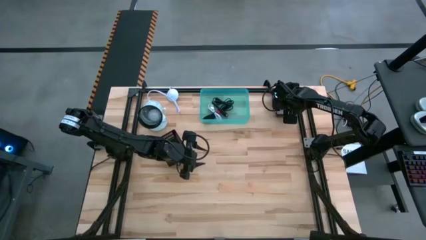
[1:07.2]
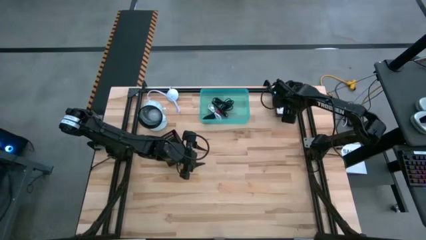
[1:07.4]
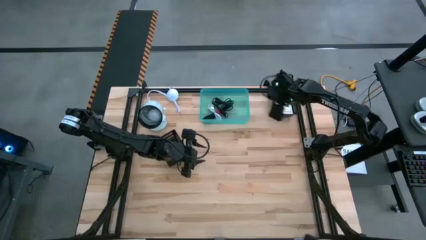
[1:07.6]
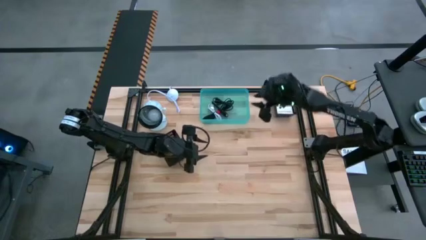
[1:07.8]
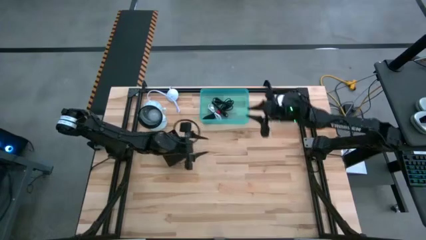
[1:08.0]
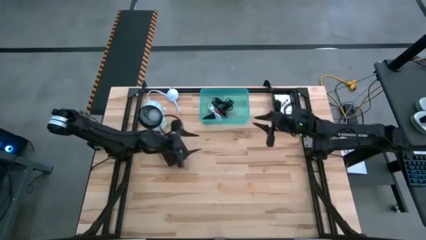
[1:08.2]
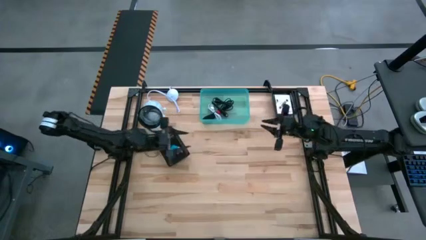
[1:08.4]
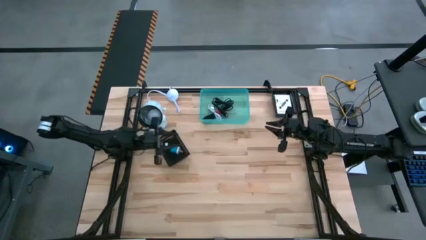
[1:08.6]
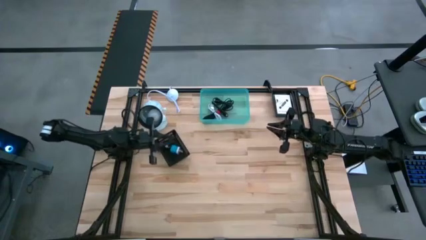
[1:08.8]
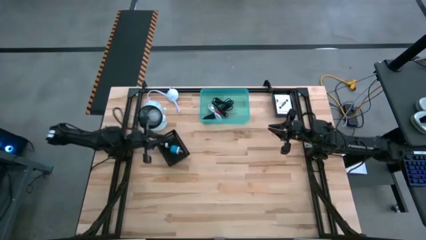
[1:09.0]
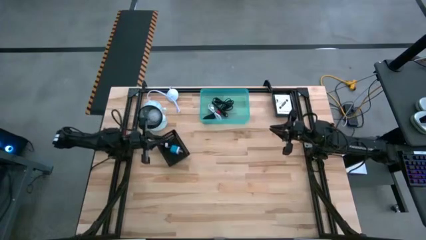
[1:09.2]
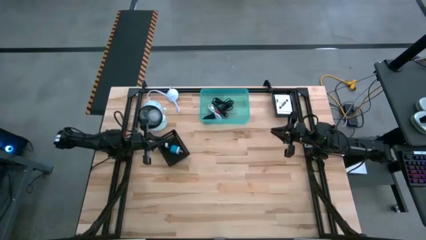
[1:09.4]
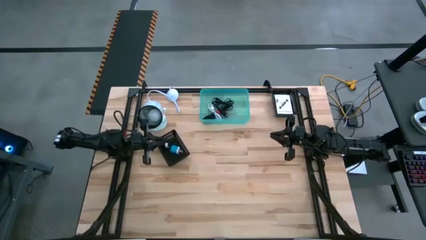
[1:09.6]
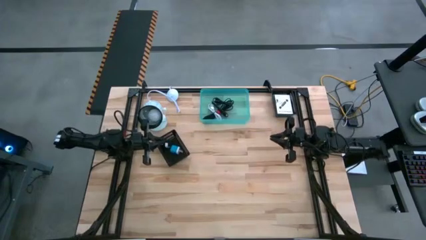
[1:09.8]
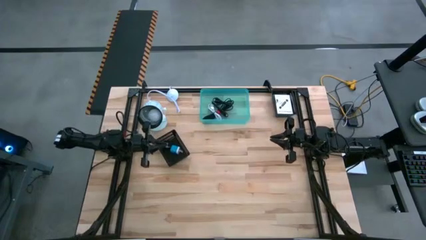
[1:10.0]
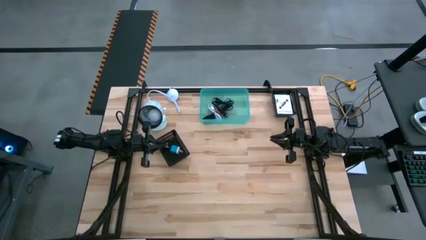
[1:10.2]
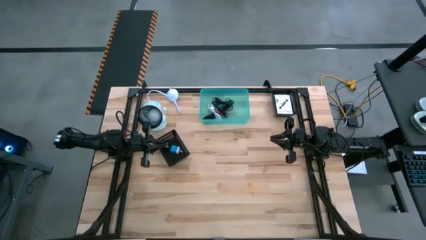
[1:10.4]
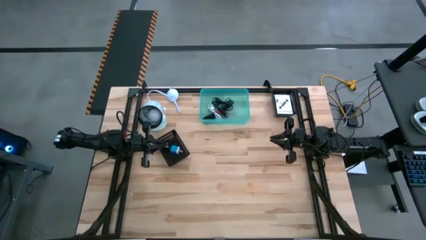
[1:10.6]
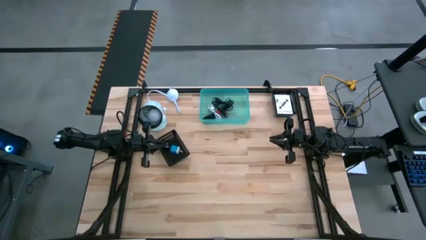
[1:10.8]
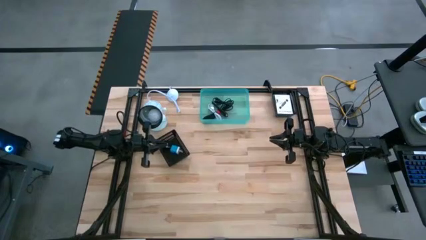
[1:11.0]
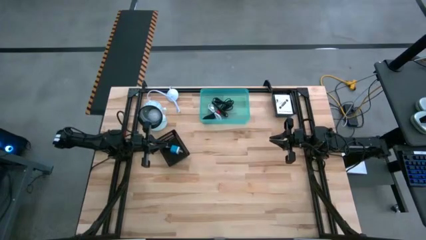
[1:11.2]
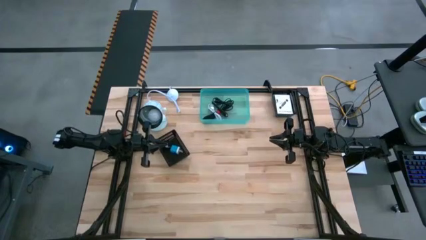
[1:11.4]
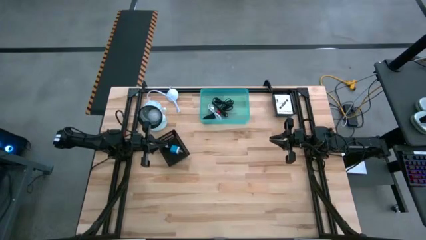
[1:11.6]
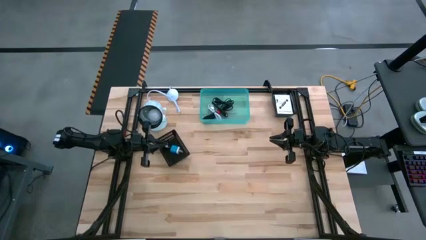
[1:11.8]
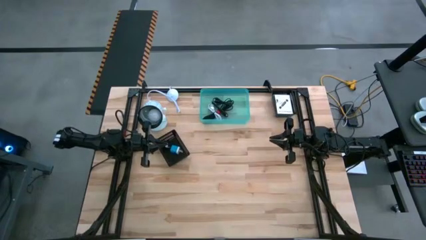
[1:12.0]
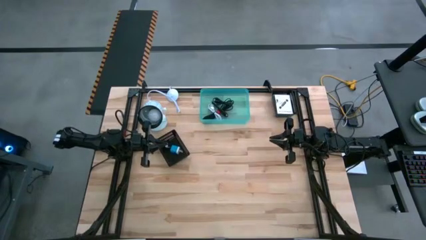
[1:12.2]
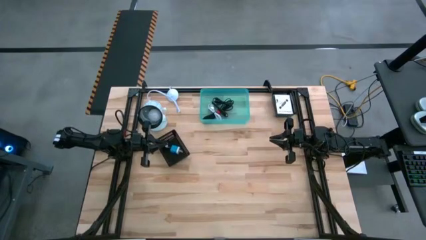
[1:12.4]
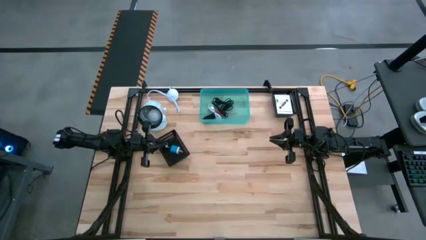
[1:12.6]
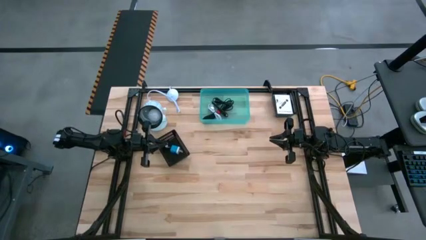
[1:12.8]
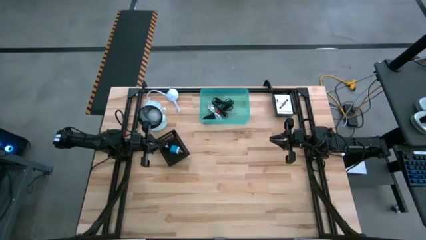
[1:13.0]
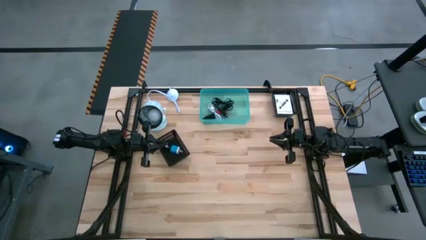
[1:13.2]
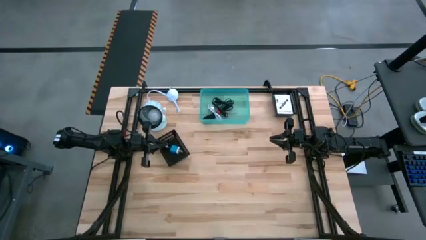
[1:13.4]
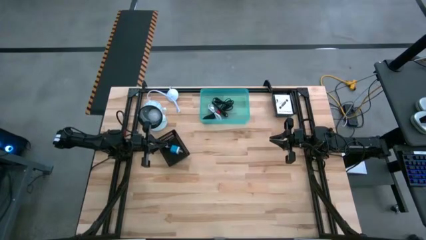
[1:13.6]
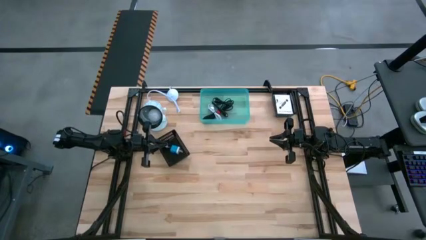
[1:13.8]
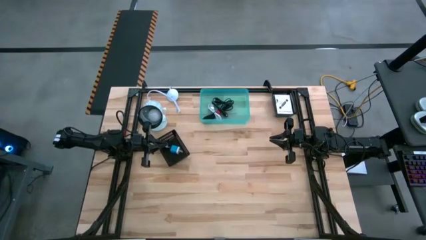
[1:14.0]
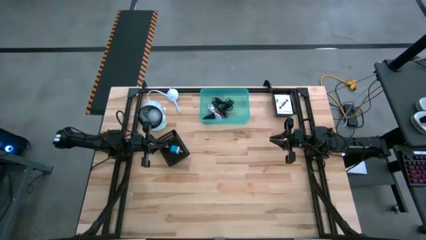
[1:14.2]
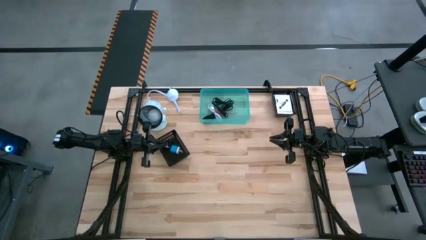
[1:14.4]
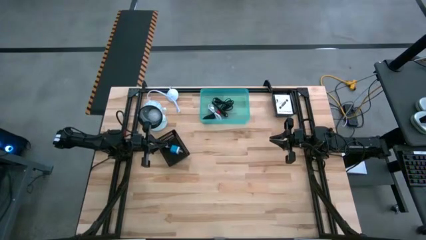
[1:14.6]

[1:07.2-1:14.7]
Task: Pick and place items into bin
Return to Home Position

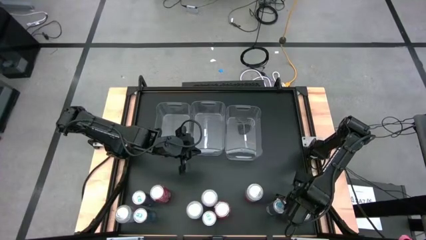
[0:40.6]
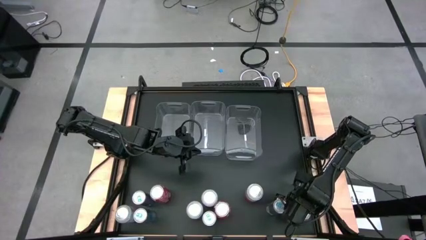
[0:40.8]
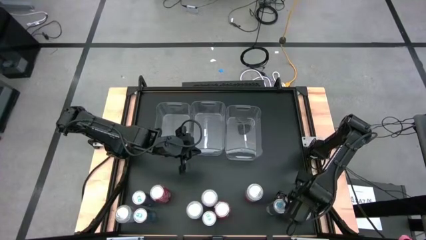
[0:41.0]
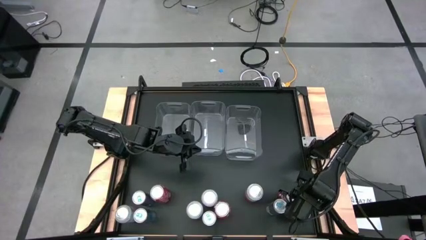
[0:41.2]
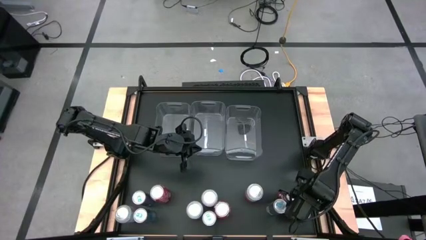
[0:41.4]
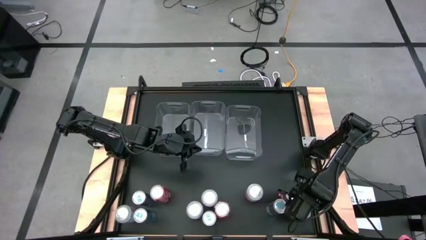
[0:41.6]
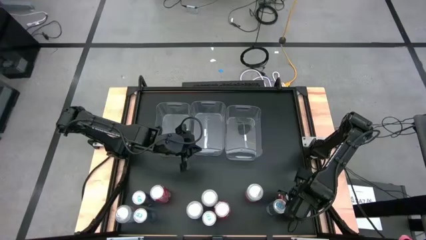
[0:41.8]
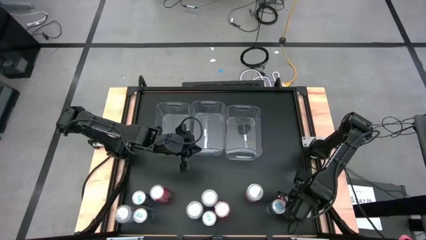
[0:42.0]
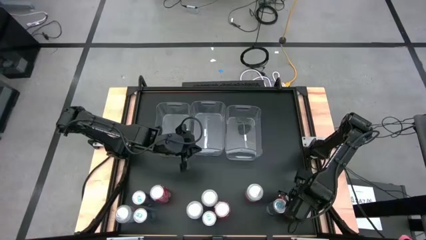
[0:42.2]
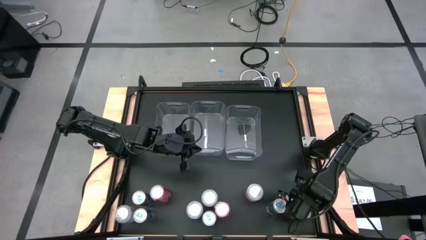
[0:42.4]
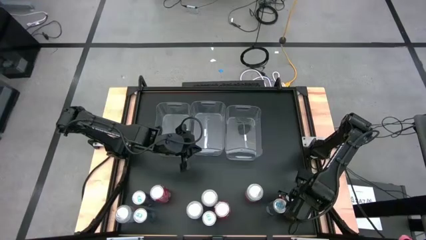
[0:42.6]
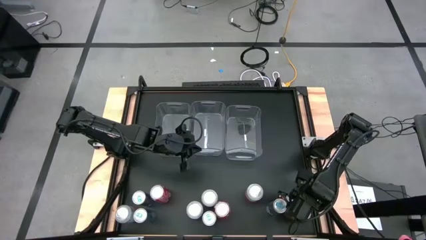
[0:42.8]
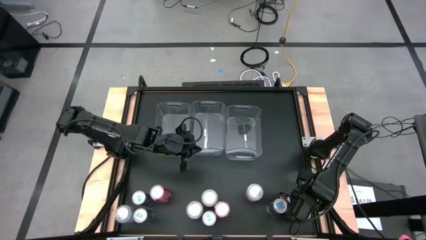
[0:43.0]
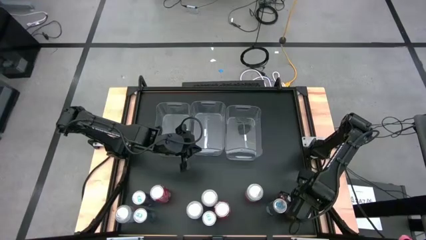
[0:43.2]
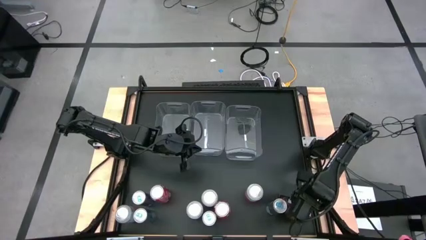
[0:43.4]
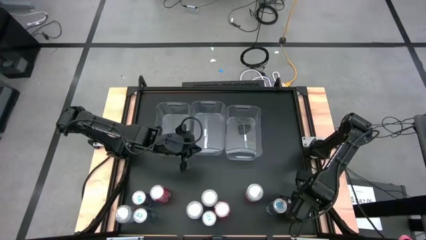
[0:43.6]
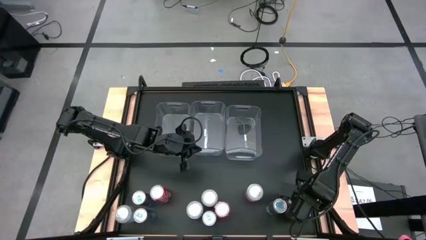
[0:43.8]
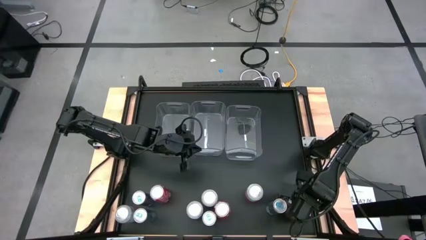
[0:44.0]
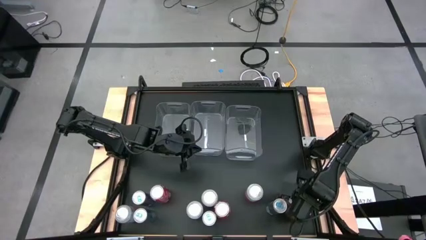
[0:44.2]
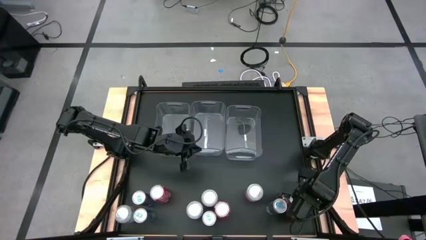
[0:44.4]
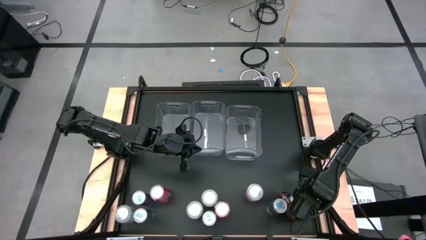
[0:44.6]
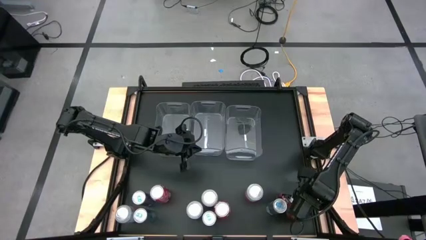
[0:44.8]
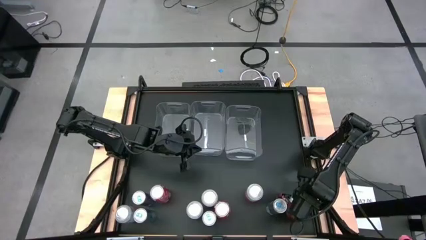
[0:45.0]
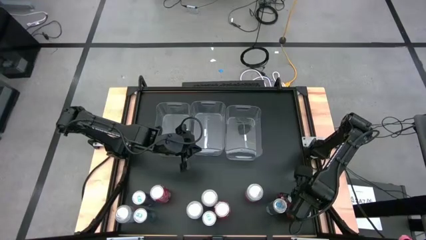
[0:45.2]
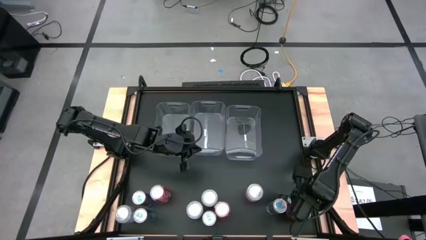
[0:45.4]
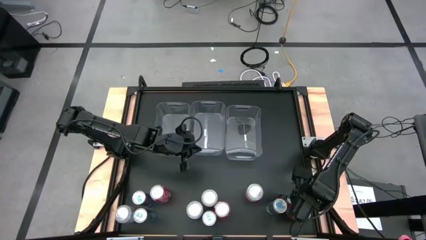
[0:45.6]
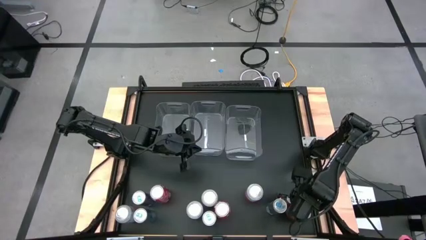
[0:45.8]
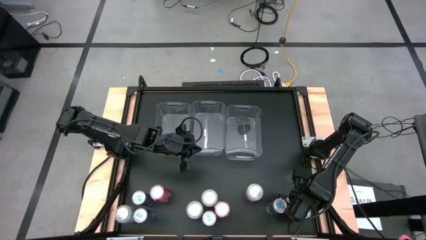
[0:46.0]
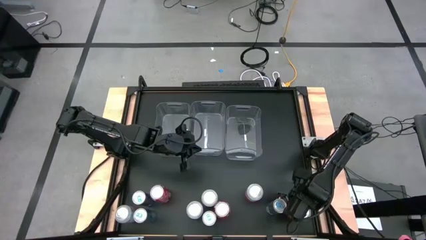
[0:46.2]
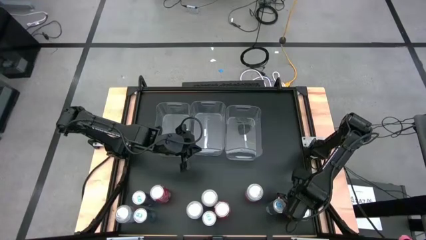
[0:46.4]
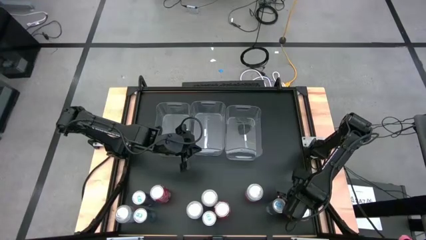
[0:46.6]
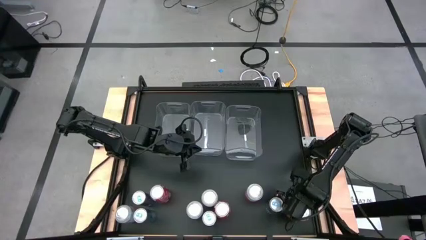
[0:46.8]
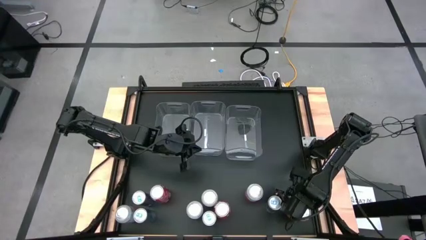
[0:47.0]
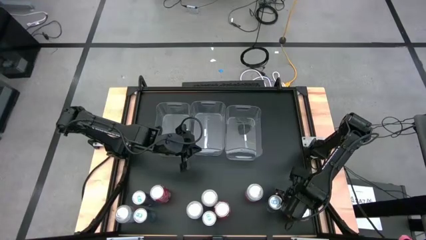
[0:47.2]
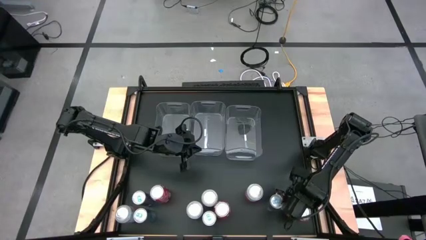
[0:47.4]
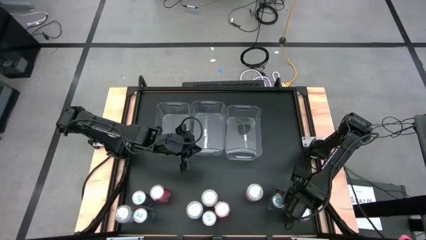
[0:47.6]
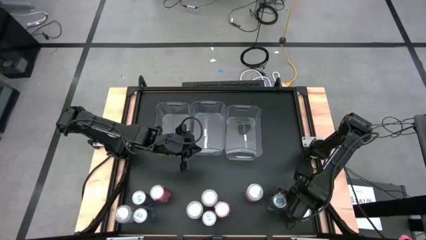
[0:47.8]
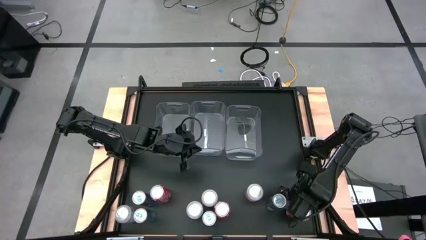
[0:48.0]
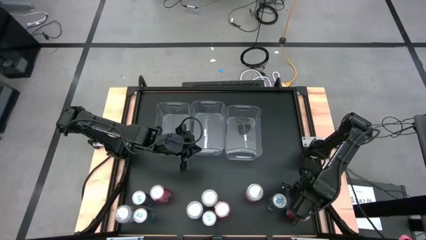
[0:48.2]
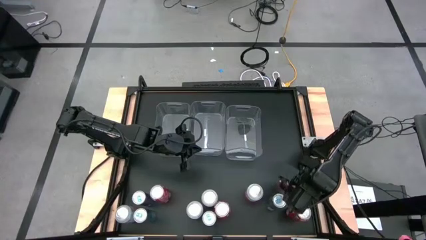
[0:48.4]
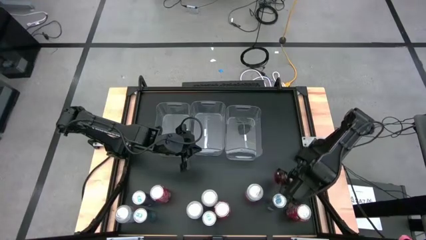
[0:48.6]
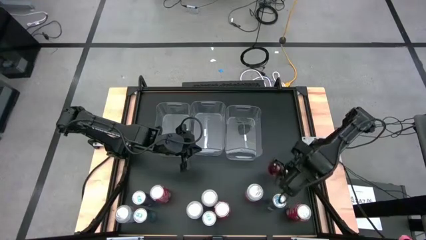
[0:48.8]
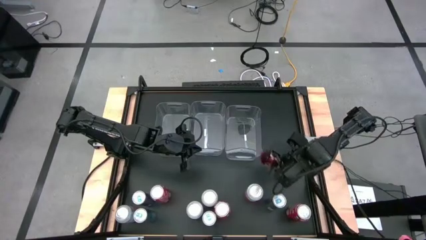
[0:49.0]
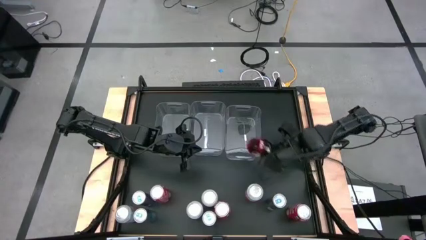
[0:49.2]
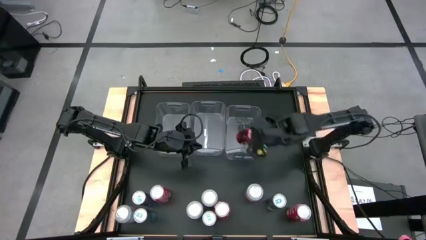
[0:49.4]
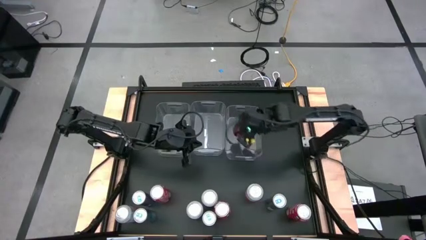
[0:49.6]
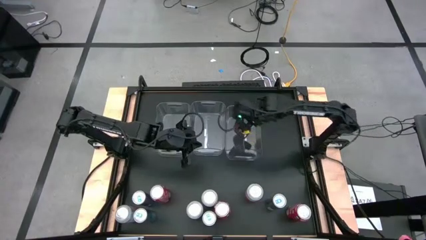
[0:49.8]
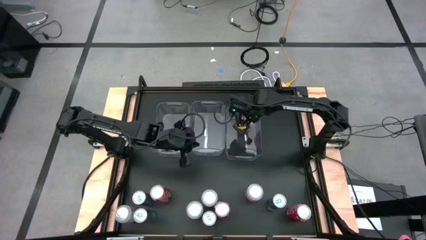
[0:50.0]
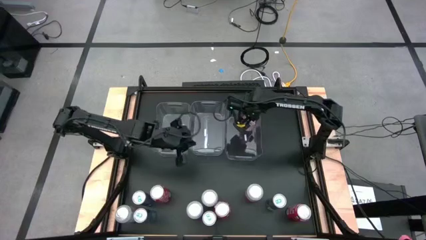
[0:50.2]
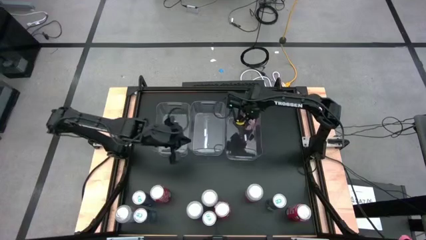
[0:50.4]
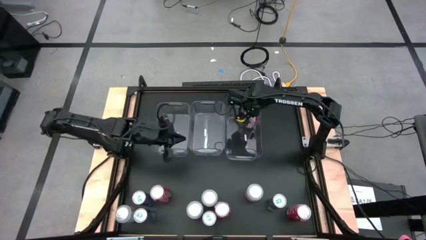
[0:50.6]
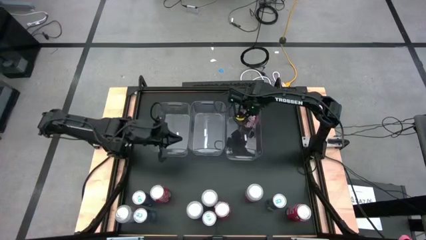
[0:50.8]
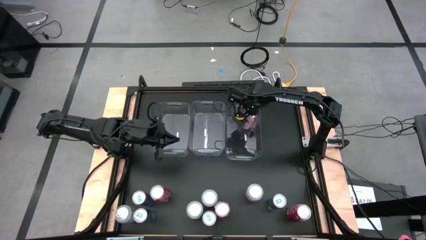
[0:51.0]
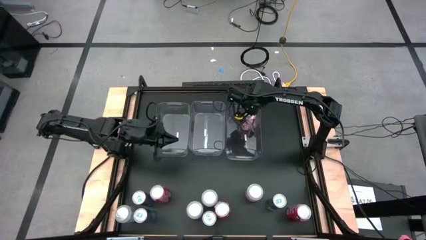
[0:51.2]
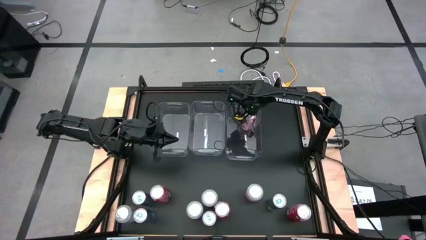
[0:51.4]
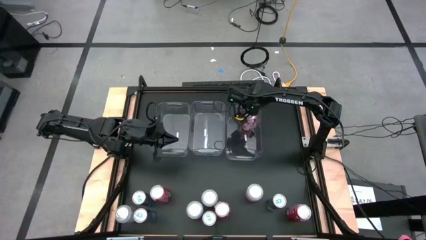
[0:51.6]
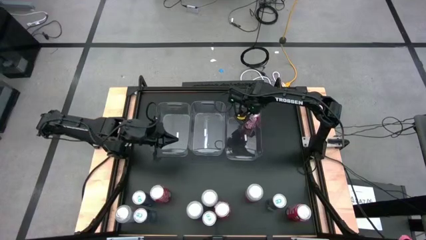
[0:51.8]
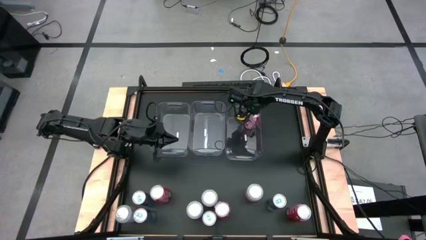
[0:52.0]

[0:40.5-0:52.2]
Task: Sort soda cans
Put the red soda can into the right transparent bin
